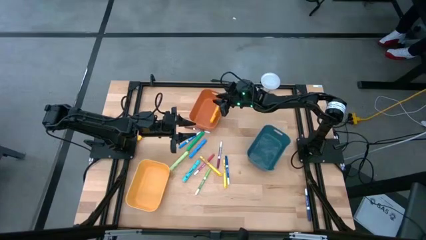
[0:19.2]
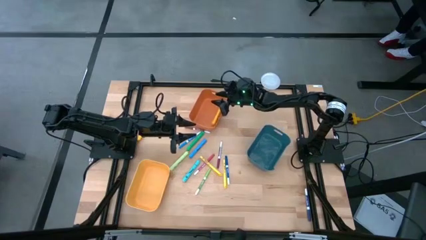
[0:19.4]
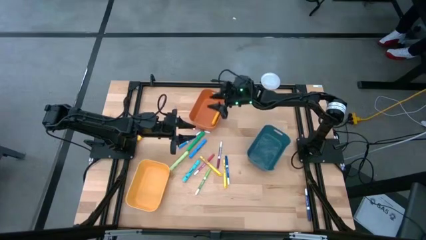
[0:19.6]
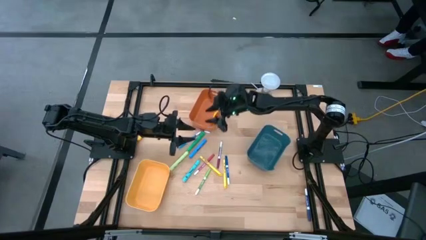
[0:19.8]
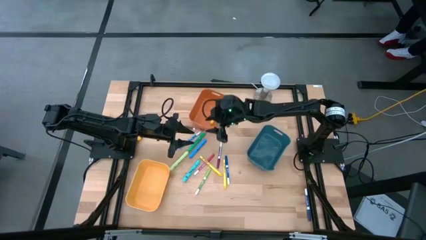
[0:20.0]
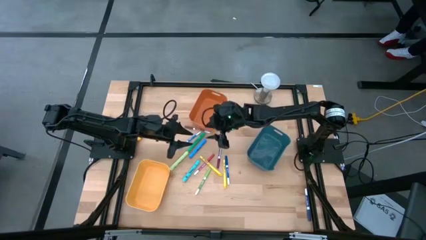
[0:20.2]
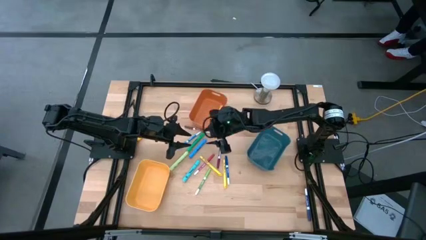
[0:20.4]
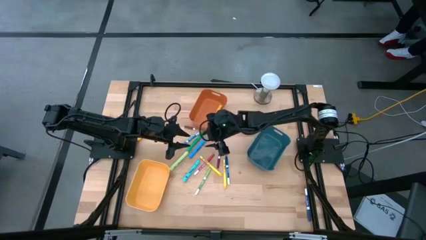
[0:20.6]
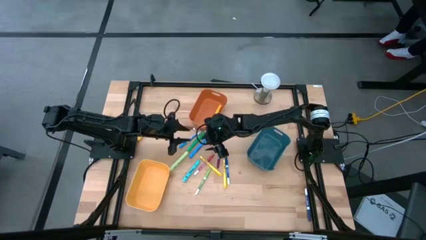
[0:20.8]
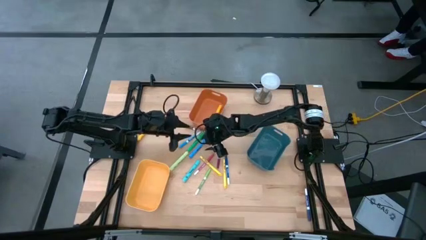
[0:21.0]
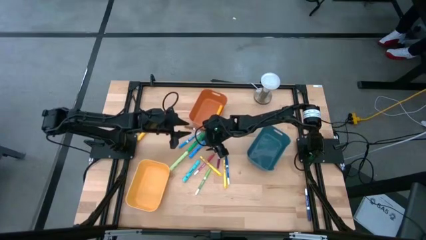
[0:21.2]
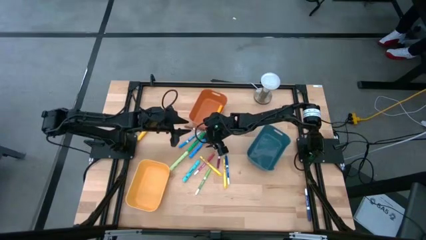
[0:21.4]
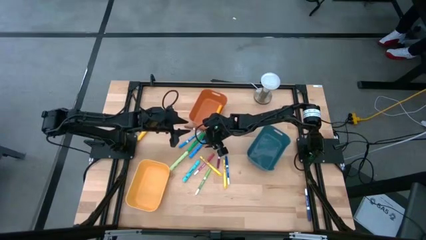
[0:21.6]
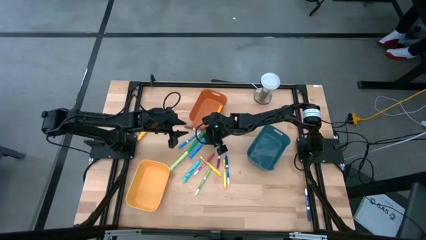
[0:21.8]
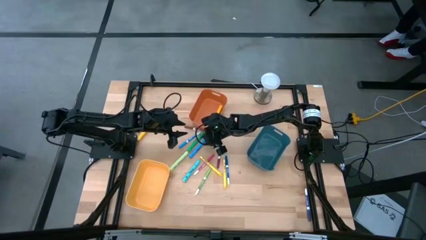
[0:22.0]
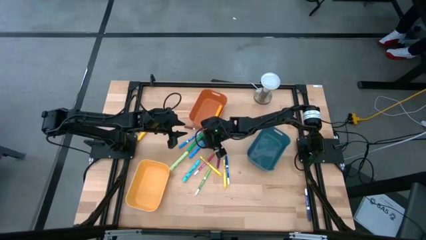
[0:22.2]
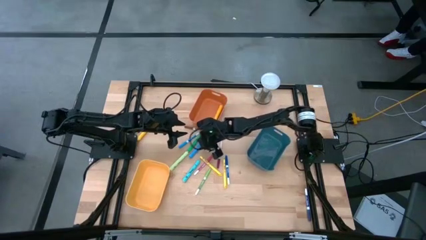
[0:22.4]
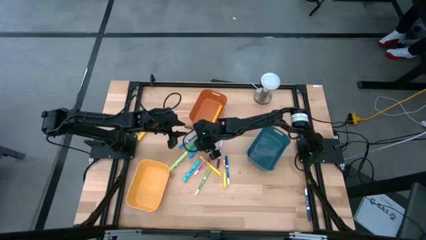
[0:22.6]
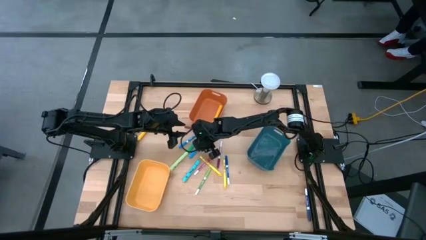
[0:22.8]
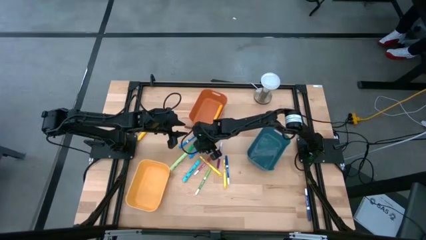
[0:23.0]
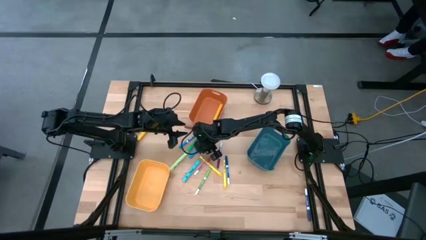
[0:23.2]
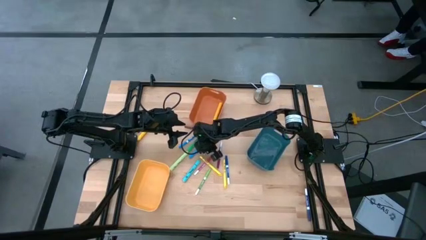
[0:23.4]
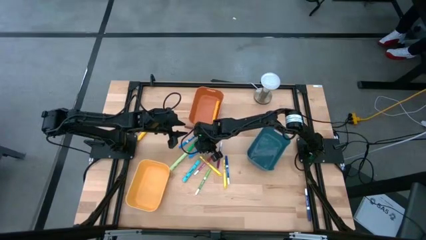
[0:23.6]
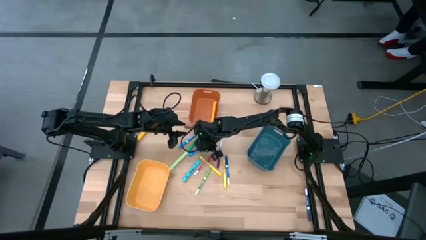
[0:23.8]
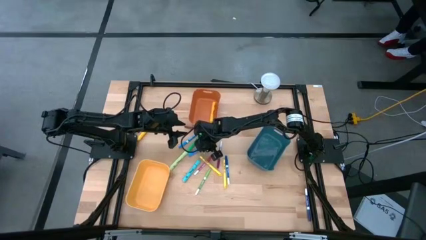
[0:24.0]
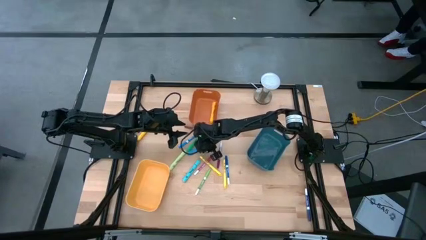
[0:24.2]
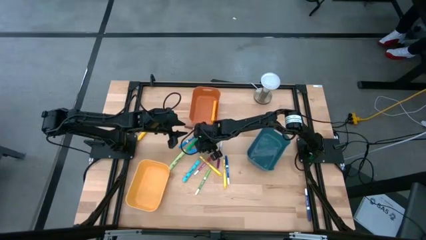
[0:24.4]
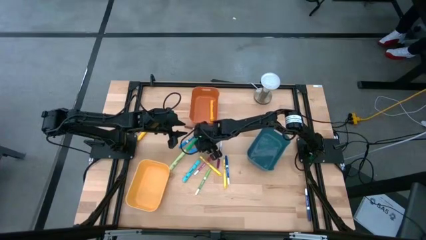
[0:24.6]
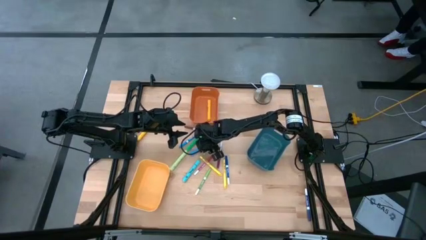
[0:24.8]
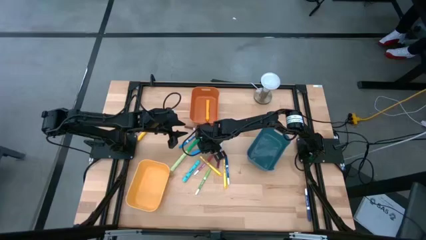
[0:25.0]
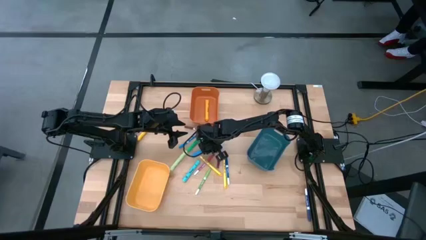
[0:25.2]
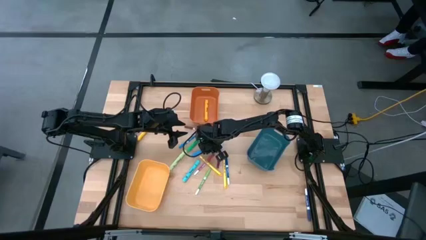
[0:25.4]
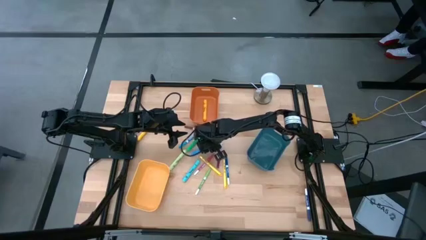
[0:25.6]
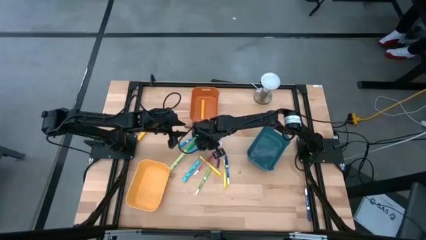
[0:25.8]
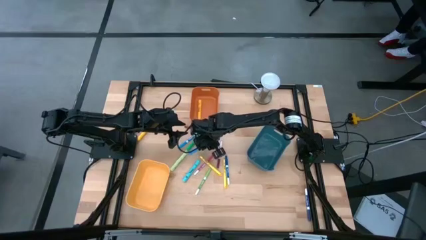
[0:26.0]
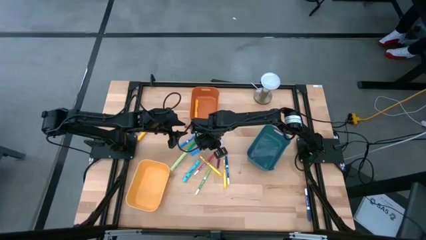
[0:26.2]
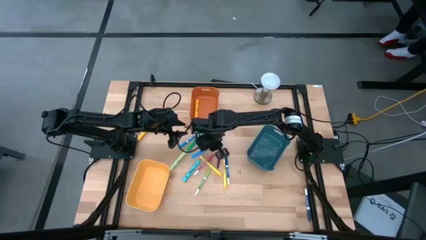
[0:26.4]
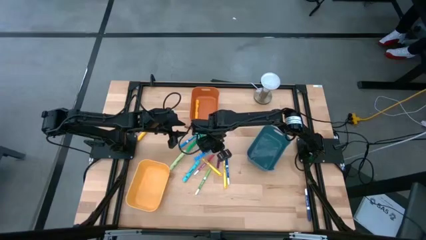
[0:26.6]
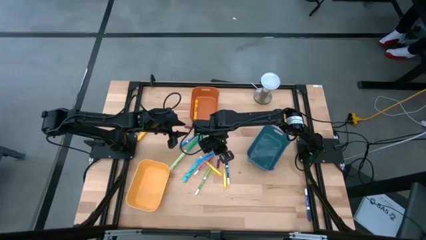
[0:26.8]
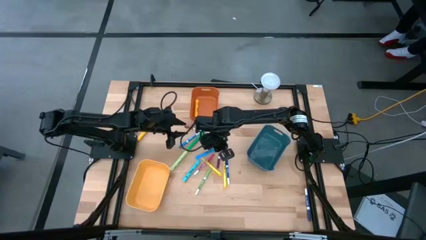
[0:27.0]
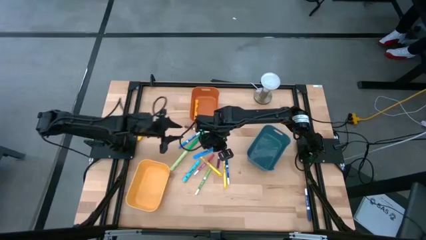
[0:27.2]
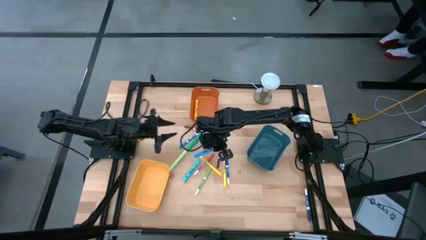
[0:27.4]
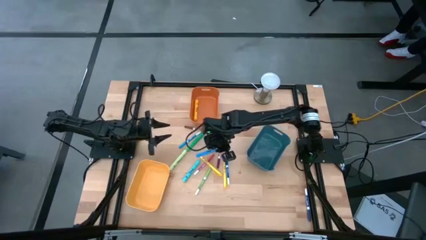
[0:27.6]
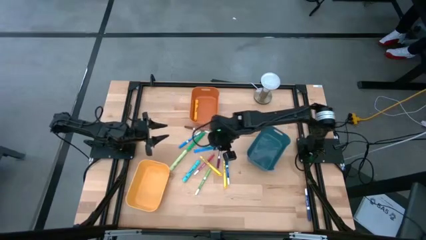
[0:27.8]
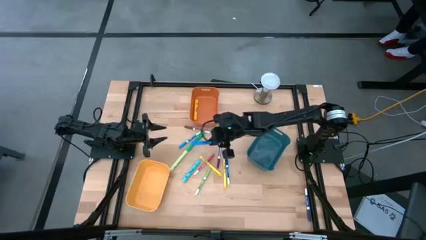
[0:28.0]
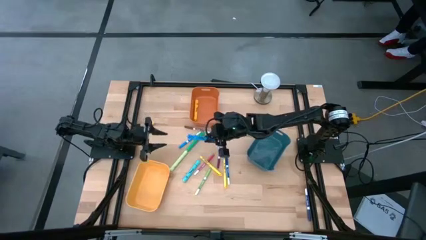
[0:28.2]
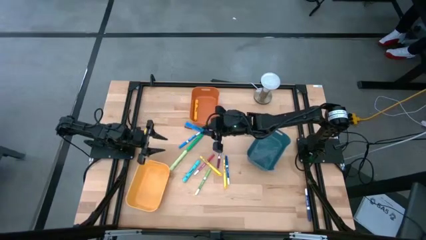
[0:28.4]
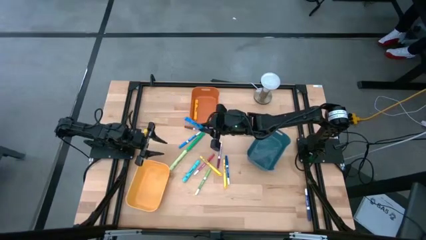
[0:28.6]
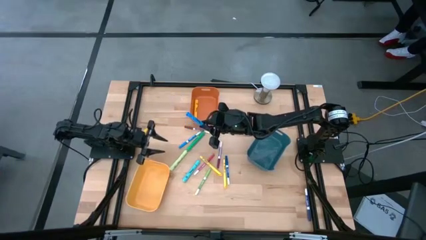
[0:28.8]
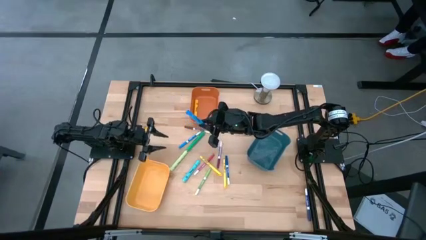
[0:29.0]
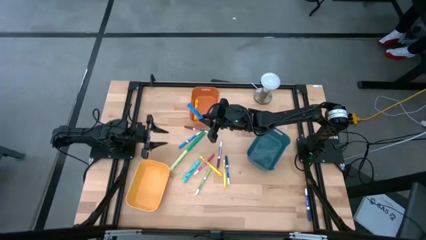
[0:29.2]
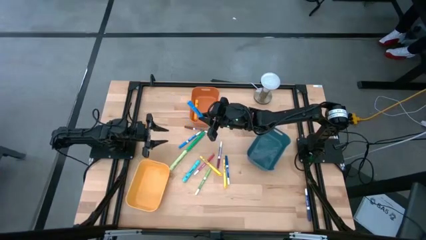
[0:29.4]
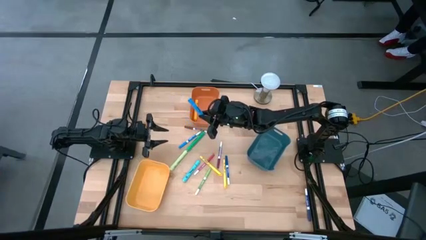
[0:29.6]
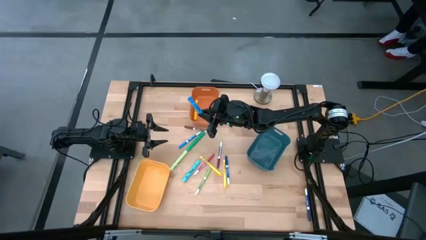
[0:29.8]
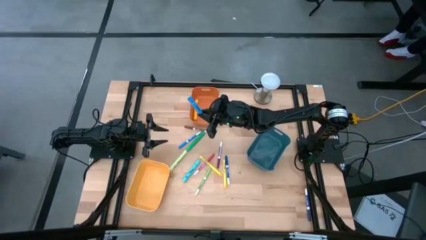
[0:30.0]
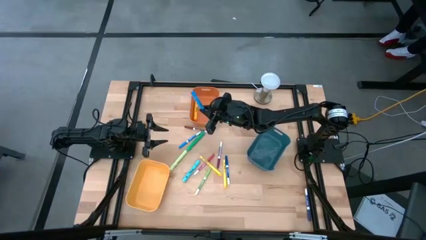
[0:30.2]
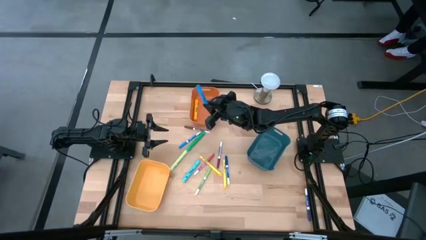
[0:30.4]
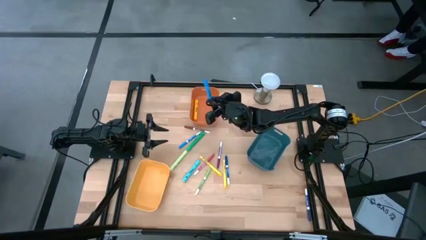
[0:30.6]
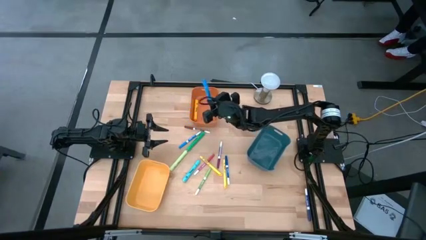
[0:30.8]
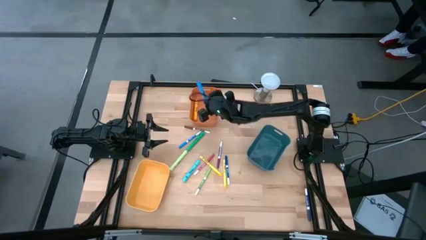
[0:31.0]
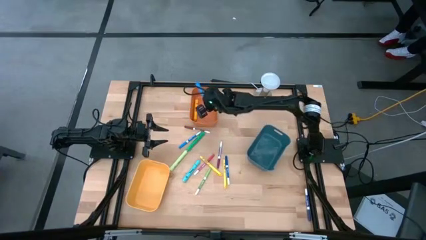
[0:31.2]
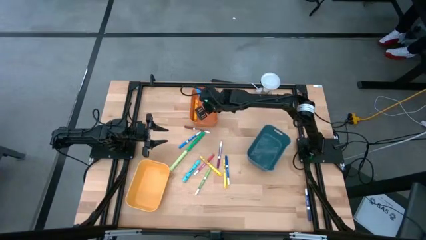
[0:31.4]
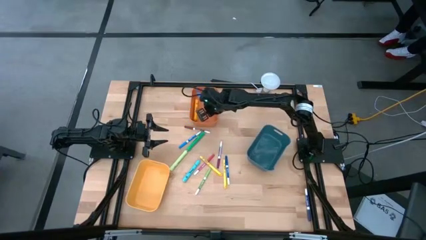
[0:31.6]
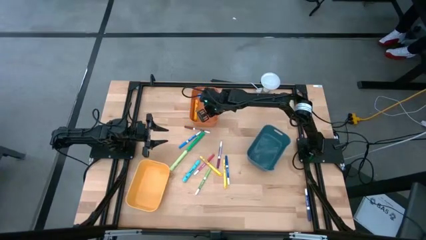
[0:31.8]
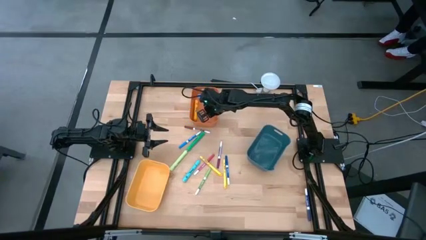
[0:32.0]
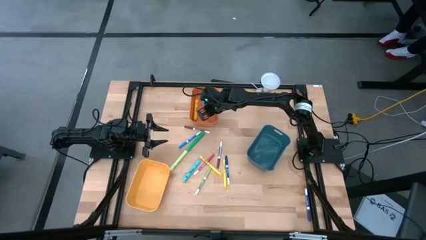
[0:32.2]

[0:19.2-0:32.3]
Task: Pick & Place Markers
Put the blue highlighter pen into the orange bin
